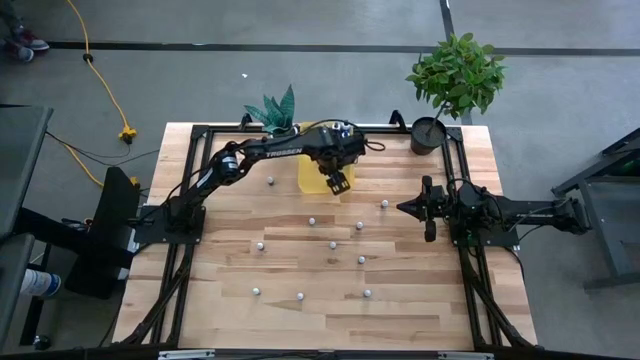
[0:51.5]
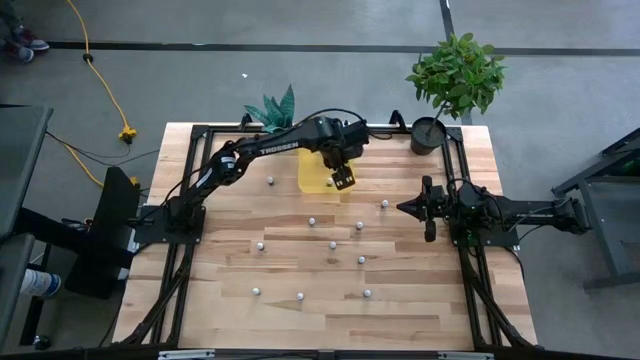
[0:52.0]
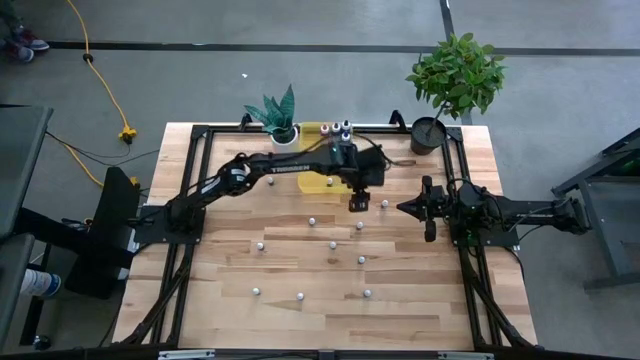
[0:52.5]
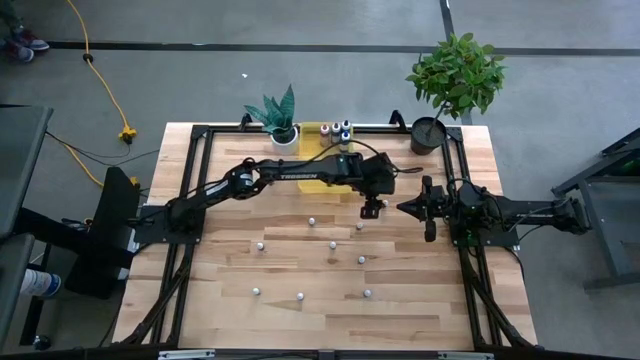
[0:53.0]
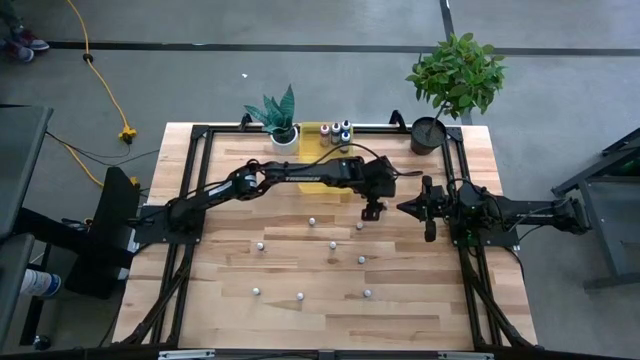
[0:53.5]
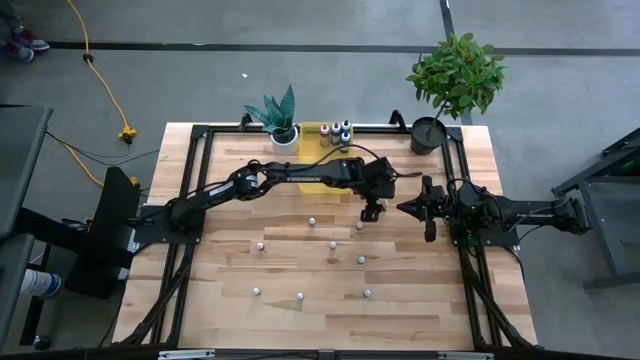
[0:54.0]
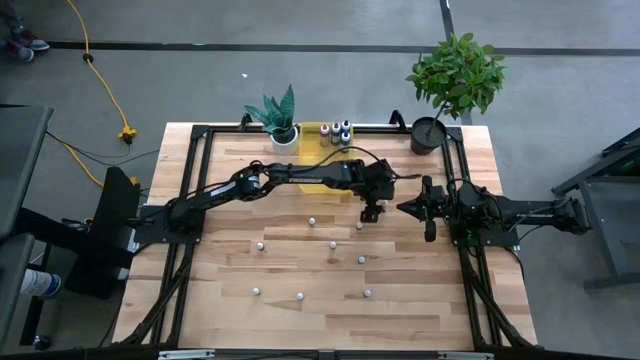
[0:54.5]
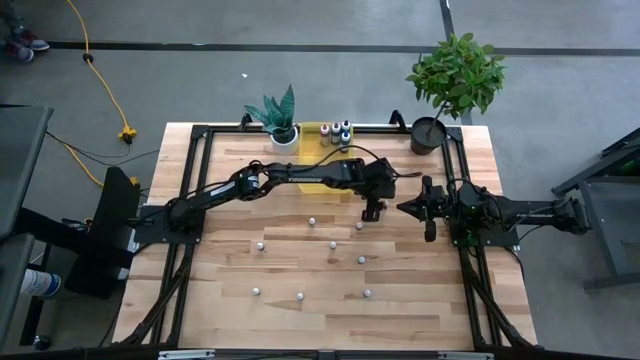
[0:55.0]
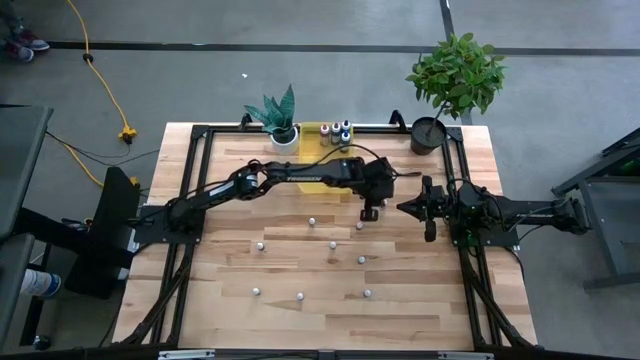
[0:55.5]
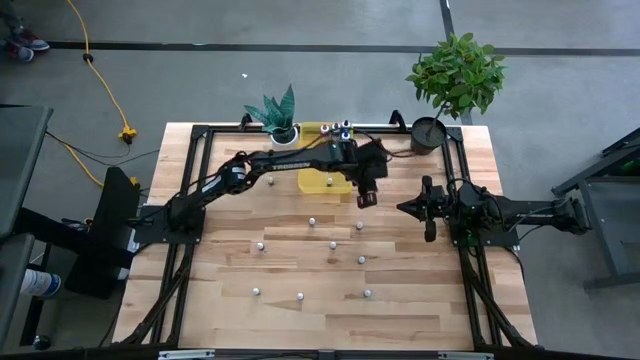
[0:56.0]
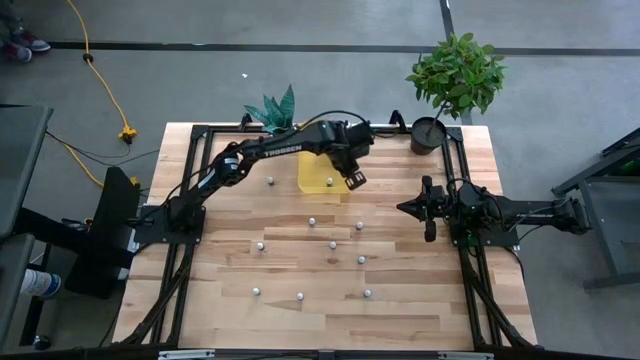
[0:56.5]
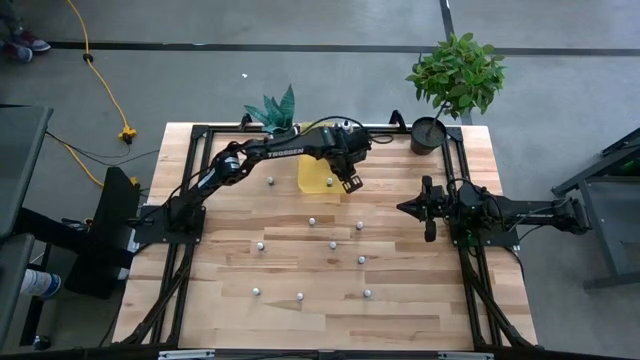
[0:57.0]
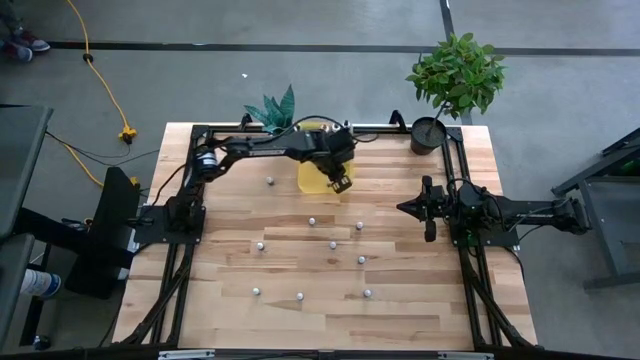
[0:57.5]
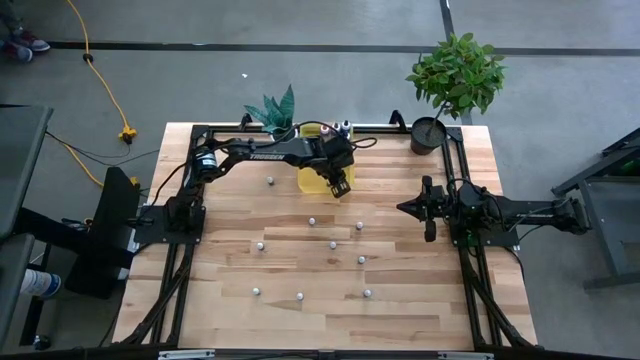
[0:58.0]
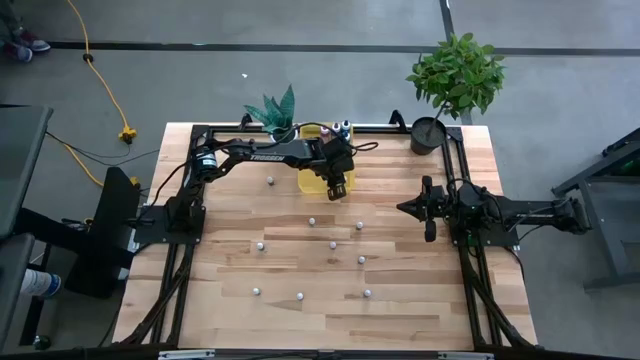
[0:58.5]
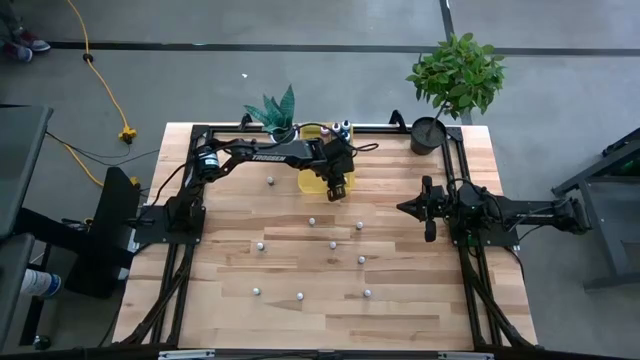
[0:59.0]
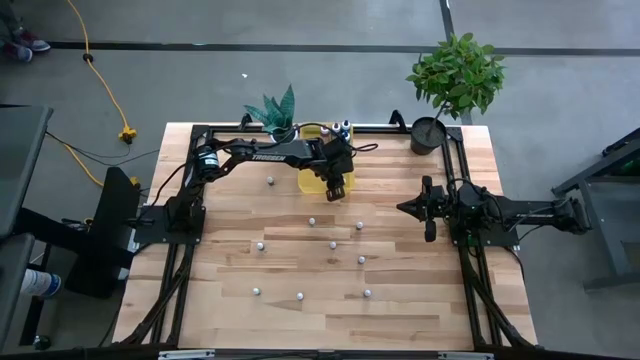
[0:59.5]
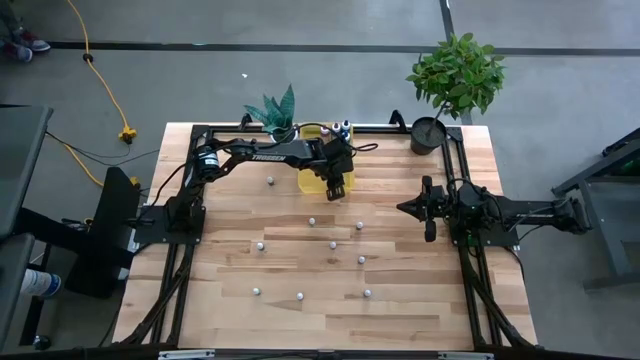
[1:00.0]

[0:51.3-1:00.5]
Task: Pick & Place food coloring
Put the top small purple food coloring bottle into the yellow bin

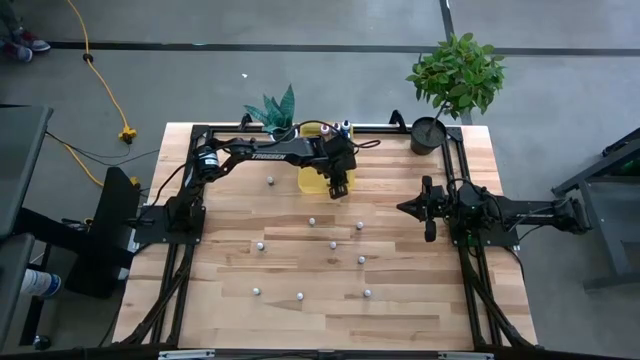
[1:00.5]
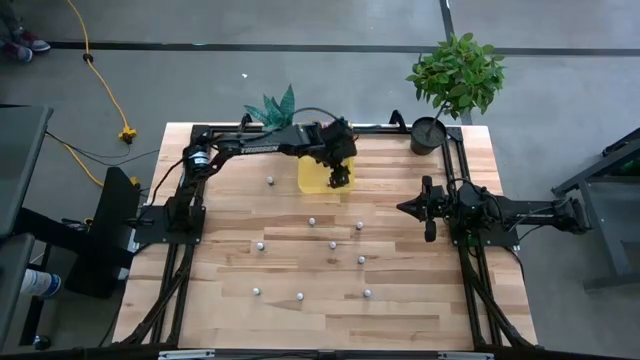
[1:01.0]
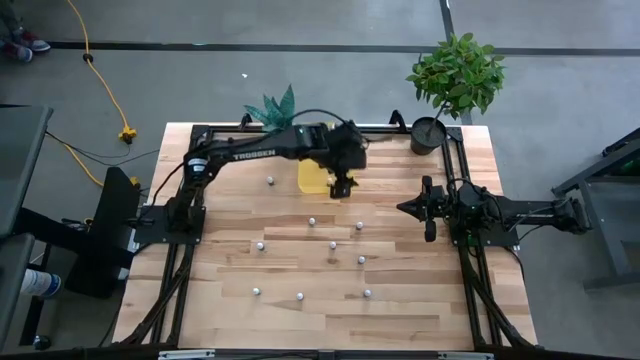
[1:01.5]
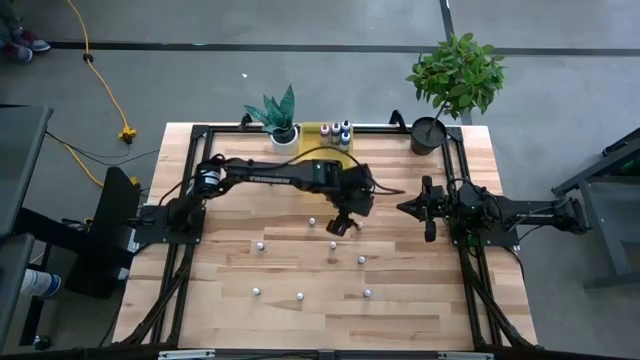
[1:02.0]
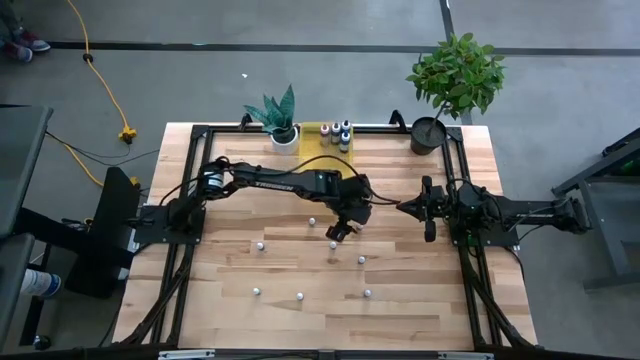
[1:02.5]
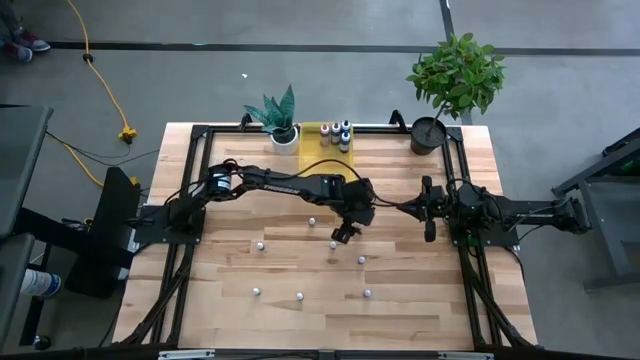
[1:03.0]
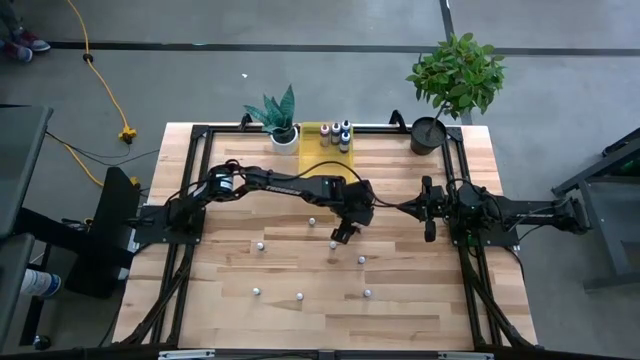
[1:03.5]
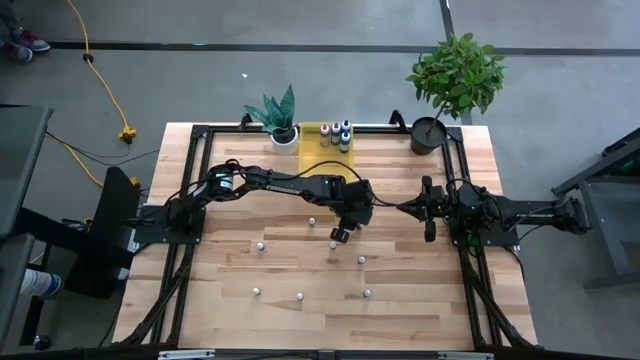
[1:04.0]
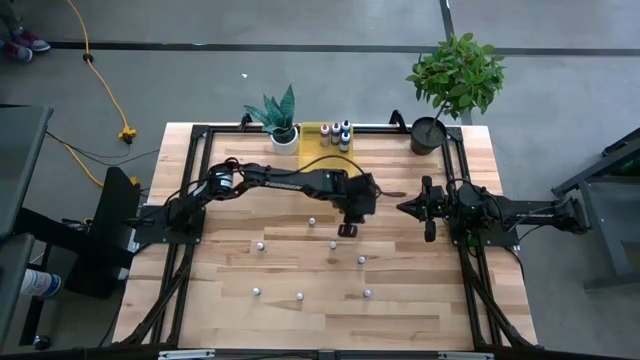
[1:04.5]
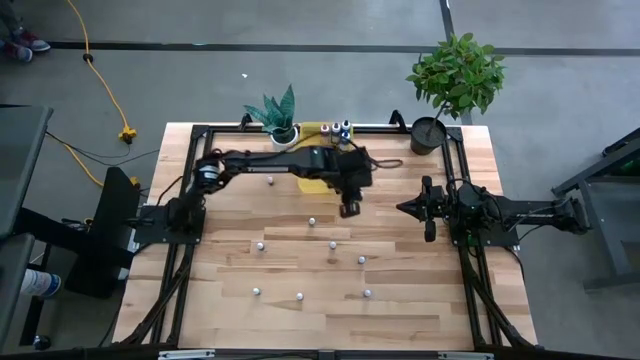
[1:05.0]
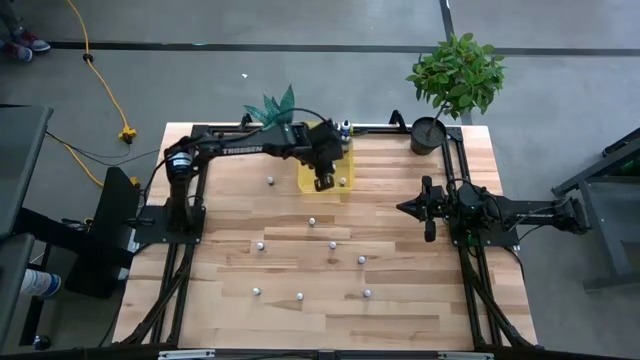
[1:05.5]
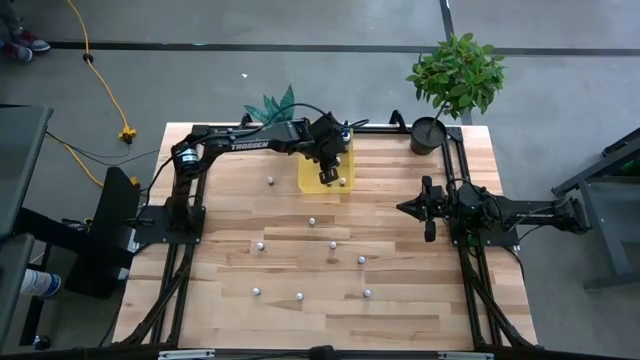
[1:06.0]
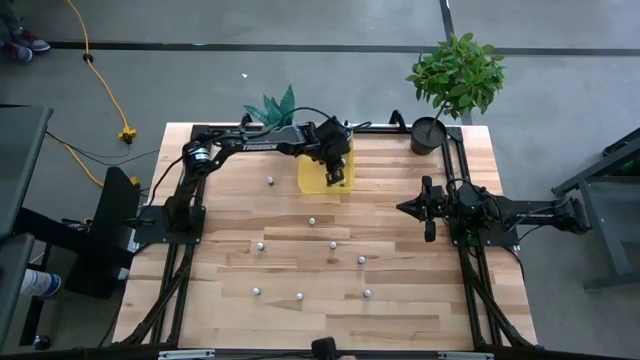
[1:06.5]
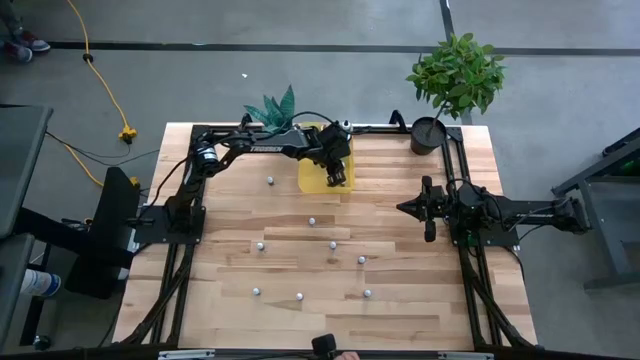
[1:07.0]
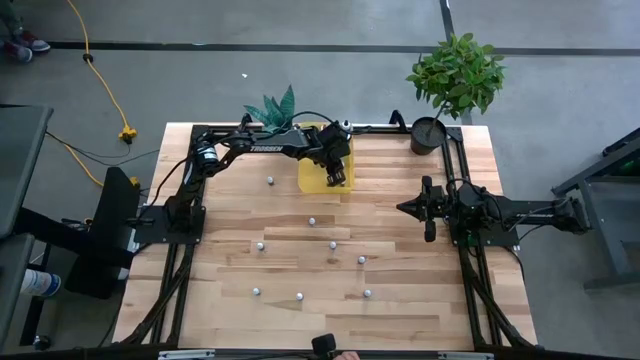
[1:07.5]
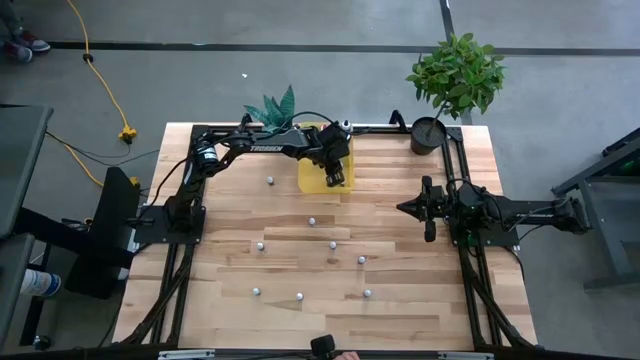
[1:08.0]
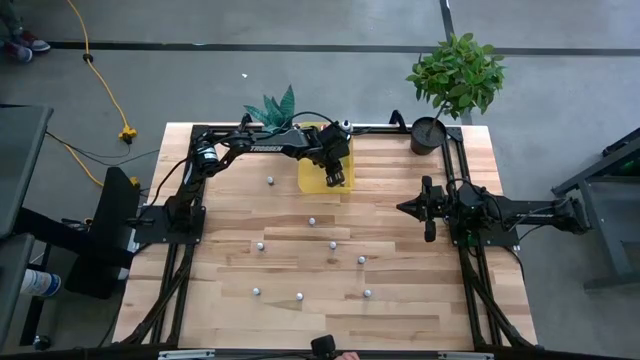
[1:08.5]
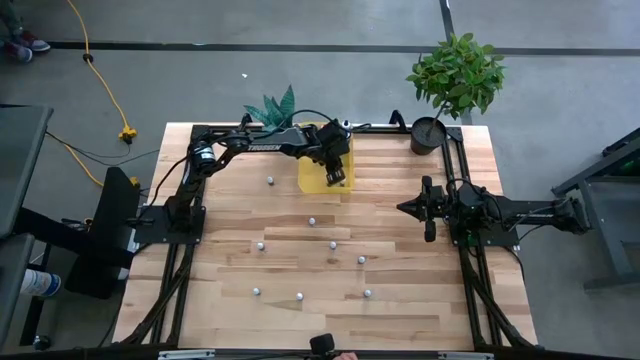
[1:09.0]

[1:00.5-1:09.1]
Put the top small red food coloring bottle into the yellow bin

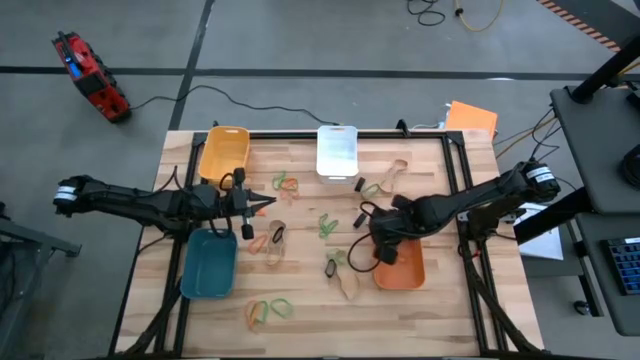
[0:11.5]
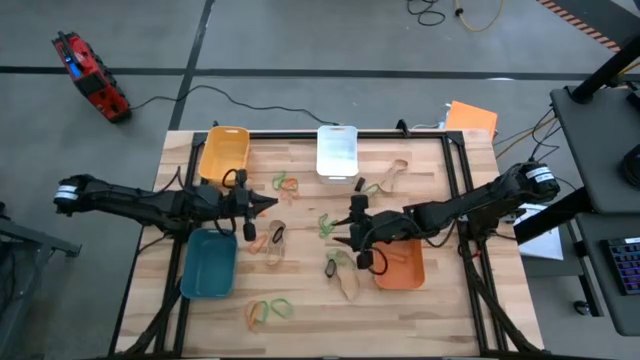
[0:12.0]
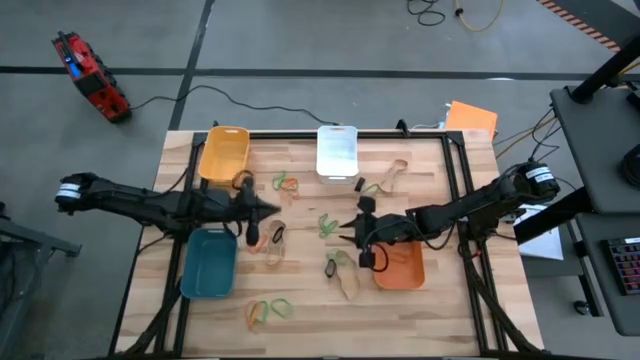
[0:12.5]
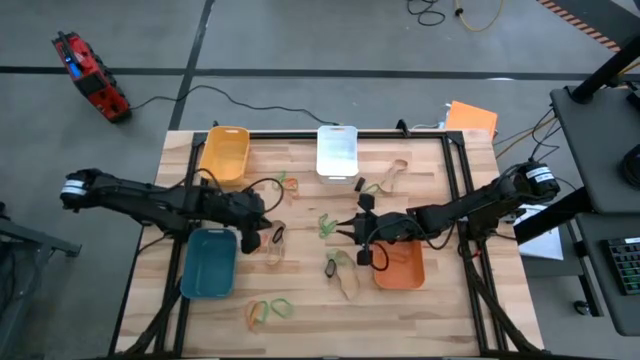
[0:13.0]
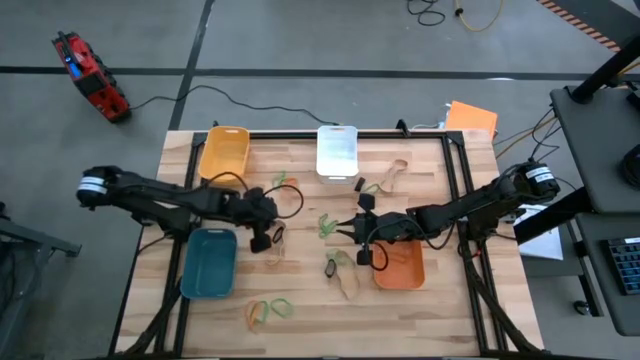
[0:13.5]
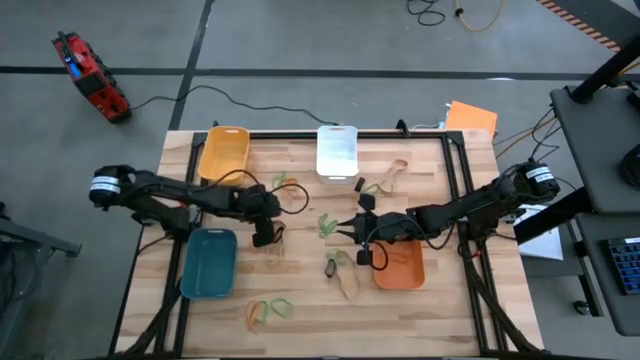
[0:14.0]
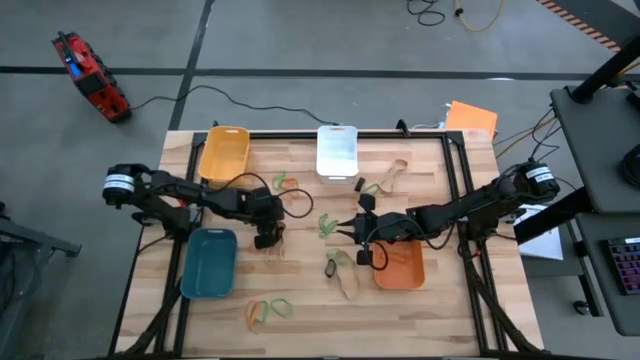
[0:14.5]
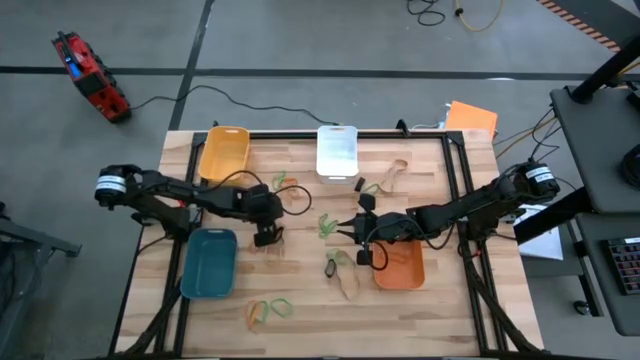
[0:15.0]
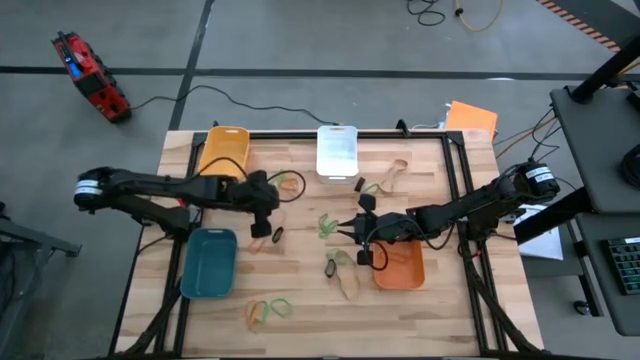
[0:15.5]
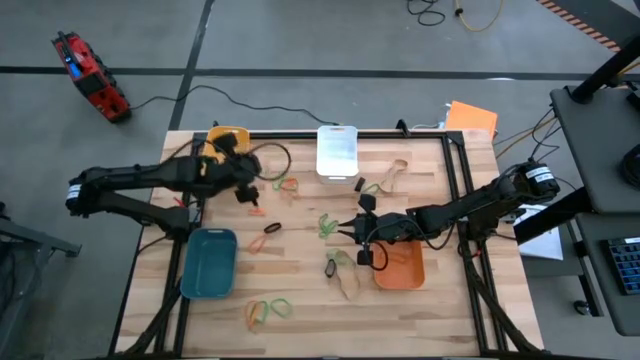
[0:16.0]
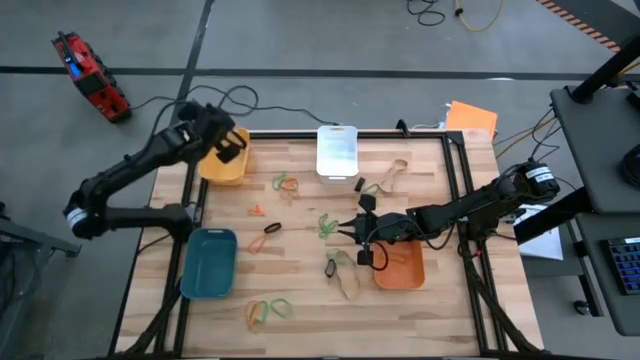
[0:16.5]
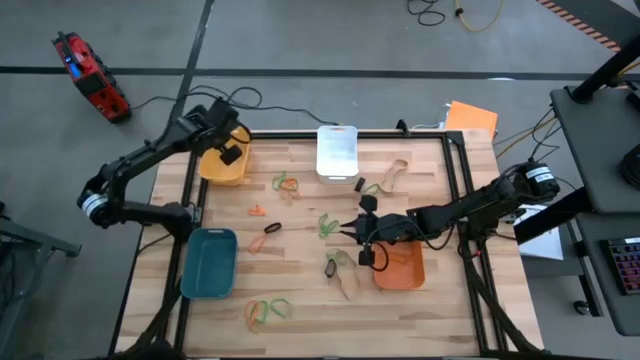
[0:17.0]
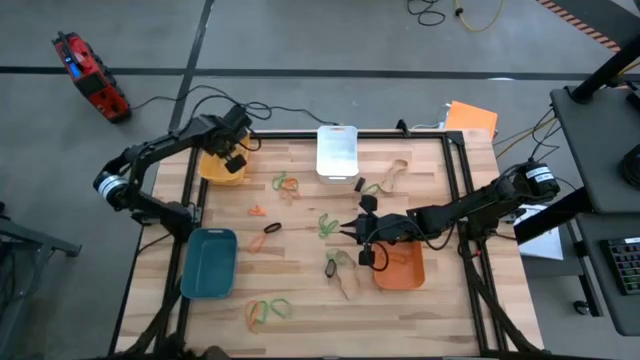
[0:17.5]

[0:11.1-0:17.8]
Task: Sort rubber bands into baskets
Put the left light brown rubber band into the yellow bin
